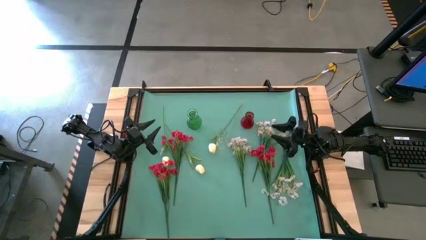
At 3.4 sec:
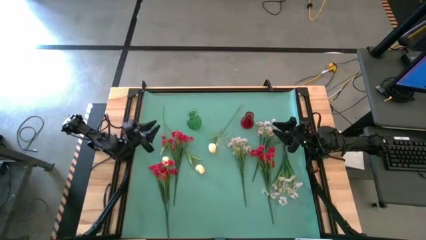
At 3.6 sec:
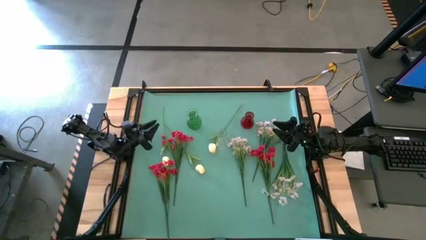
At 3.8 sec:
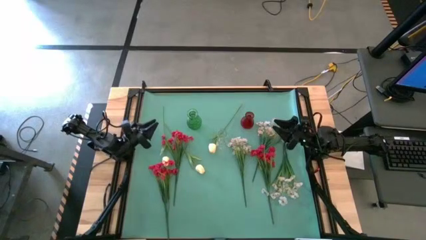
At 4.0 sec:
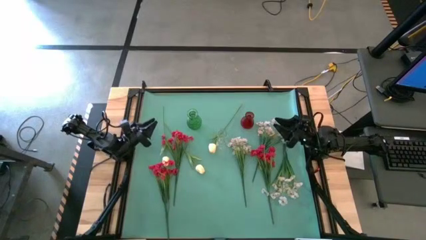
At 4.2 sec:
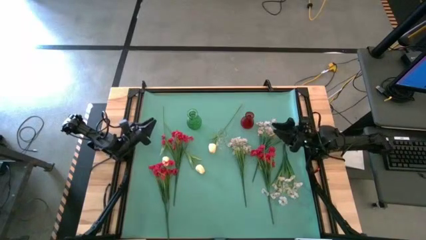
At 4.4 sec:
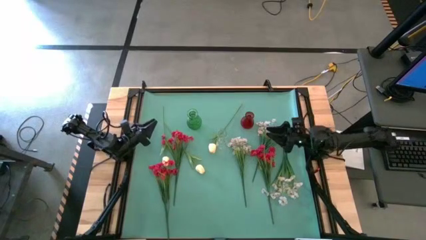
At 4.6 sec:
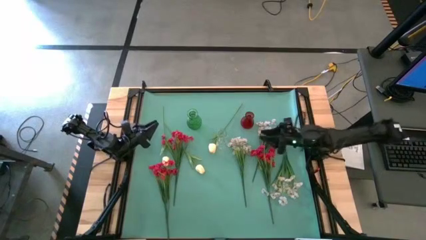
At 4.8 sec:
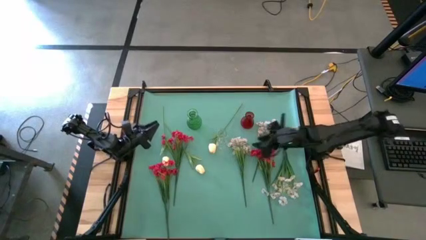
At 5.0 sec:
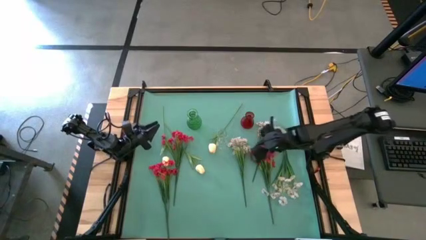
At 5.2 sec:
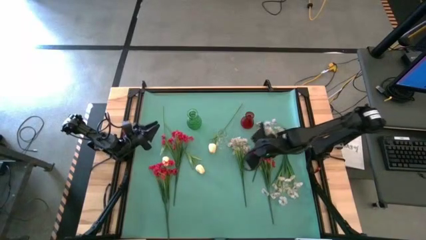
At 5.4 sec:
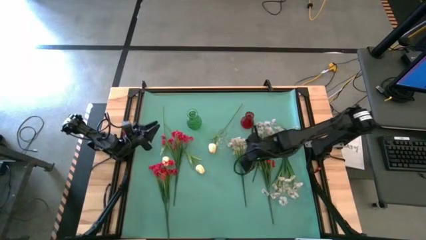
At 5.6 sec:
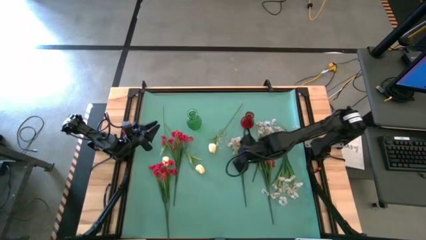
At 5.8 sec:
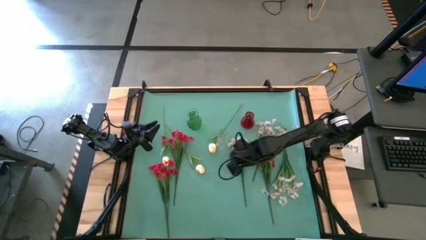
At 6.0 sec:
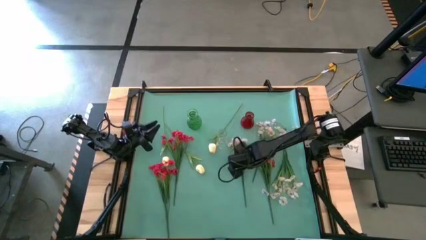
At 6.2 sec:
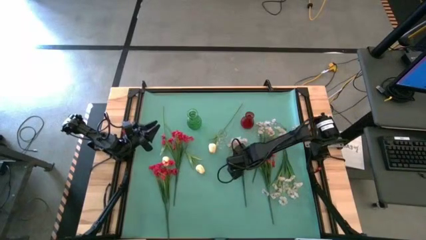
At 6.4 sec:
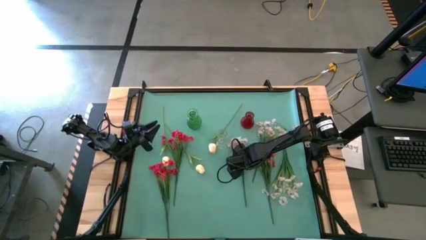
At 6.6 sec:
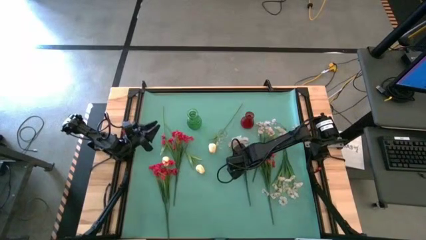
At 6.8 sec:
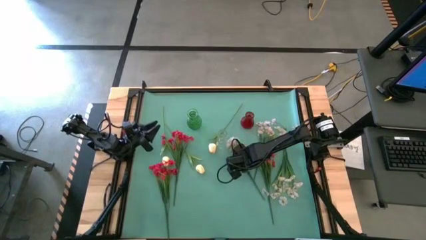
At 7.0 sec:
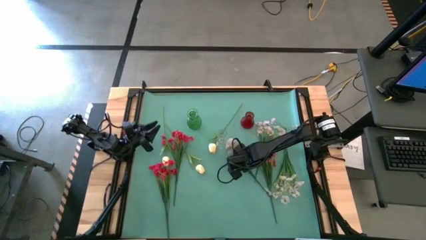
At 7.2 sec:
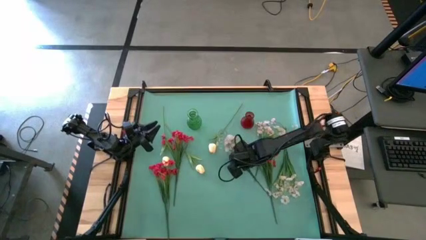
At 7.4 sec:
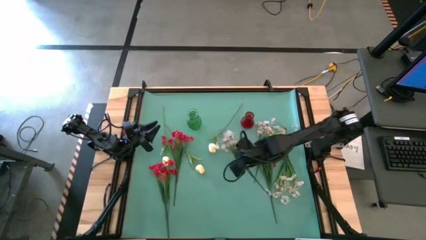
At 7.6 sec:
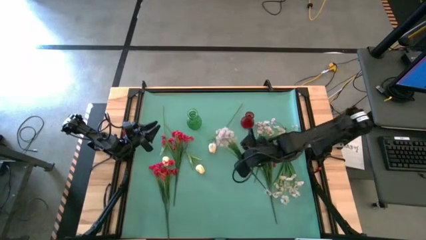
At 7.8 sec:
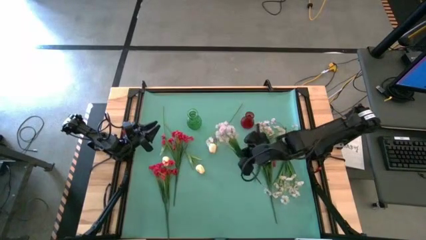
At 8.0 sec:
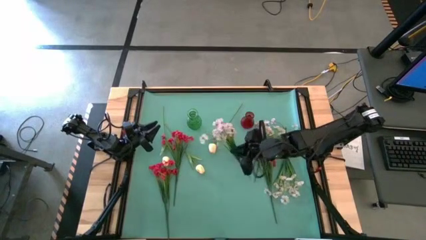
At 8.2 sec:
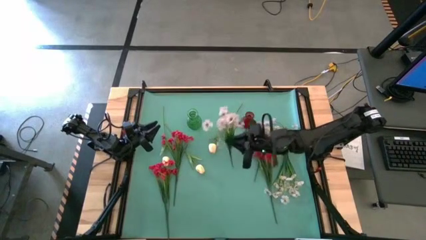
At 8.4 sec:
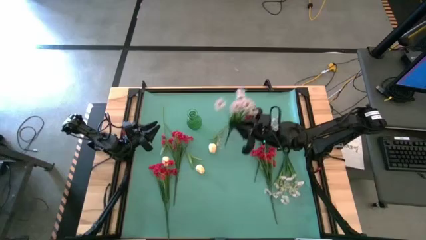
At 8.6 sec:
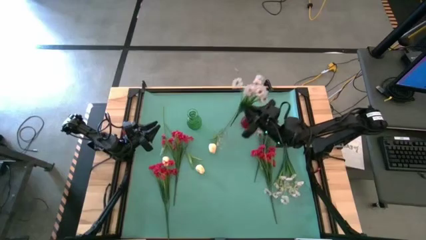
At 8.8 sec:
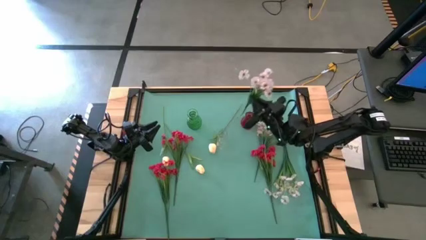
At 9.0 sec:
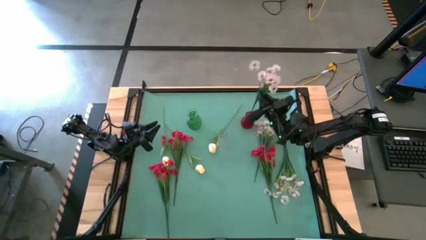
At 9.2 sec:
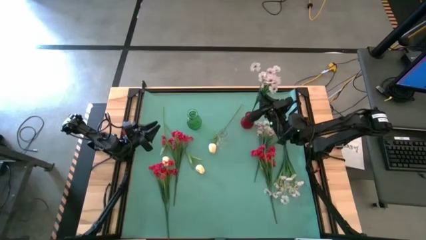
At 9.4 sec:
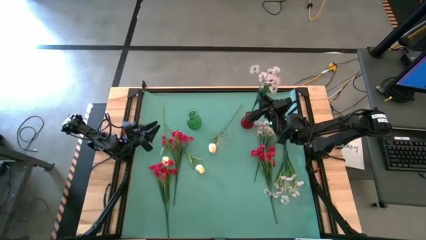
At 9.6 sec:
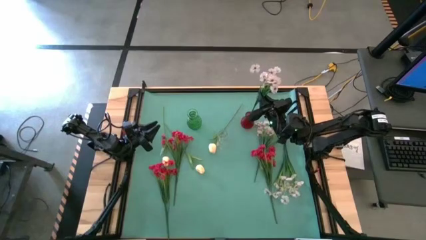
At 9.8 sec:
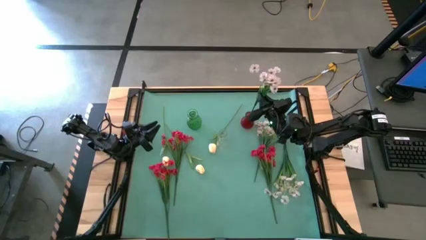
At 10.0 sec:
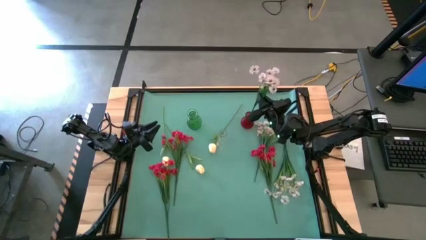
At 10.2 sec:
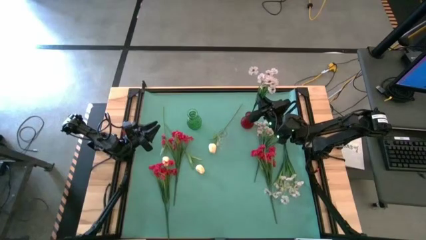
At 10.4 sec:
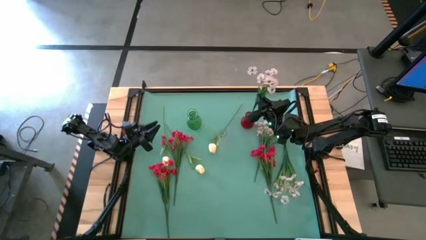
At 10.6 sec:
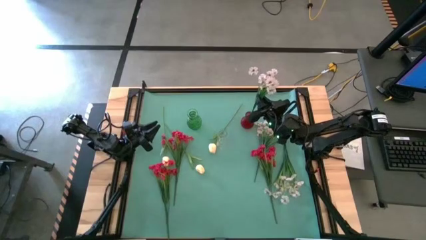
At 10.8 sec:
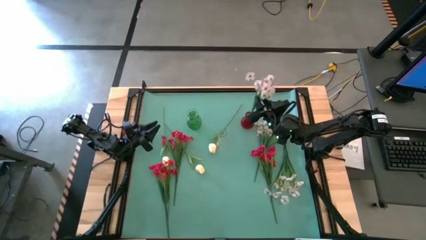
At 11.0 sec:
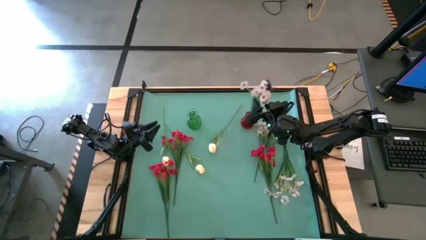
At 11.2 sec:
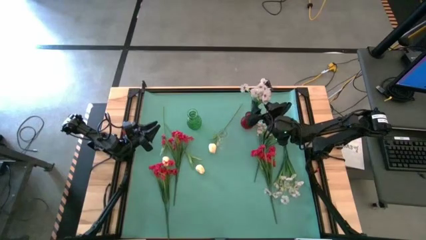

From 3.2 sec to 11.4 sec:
Task: Sort flowers into vase by color
Put the middle left white flower into the red vase

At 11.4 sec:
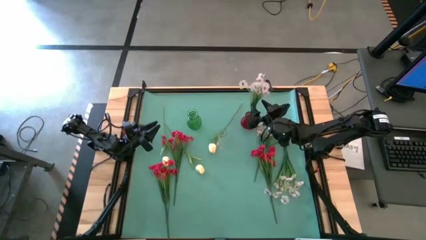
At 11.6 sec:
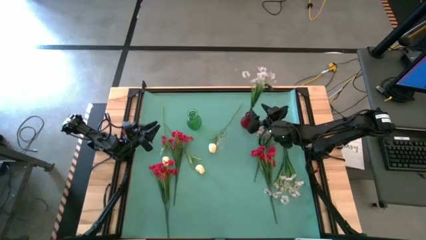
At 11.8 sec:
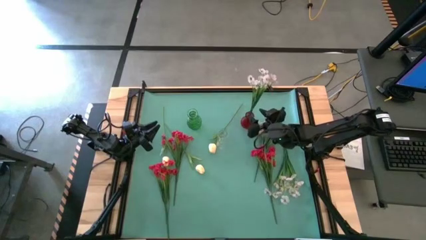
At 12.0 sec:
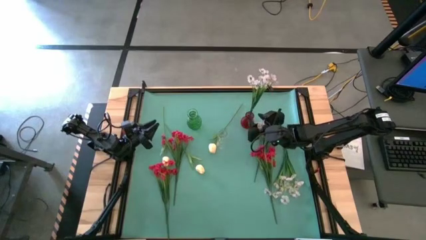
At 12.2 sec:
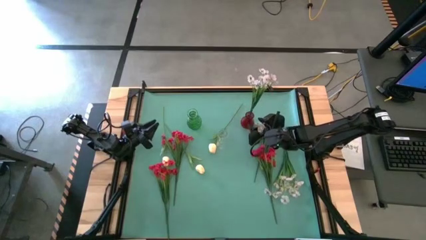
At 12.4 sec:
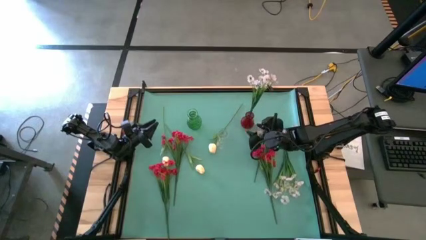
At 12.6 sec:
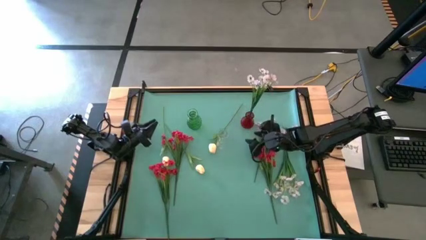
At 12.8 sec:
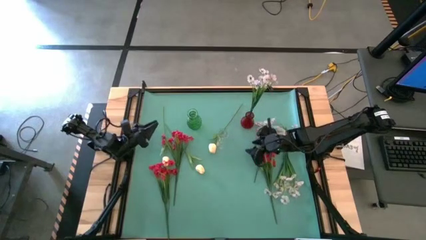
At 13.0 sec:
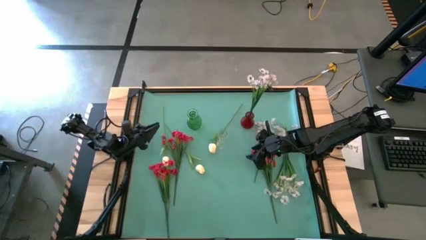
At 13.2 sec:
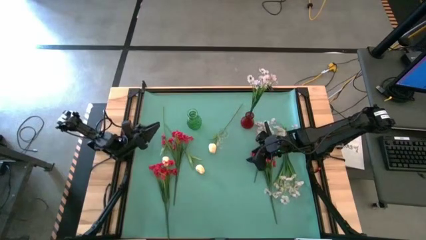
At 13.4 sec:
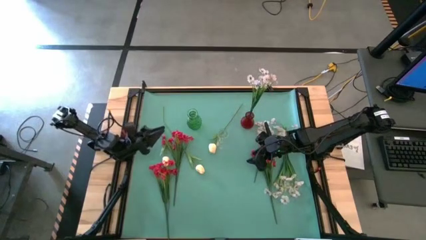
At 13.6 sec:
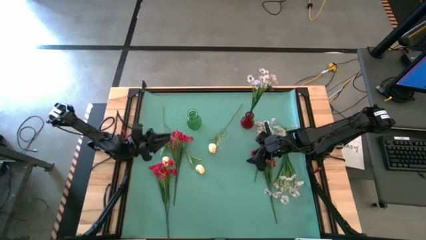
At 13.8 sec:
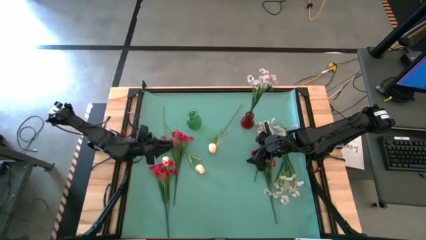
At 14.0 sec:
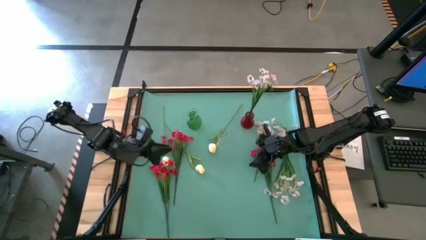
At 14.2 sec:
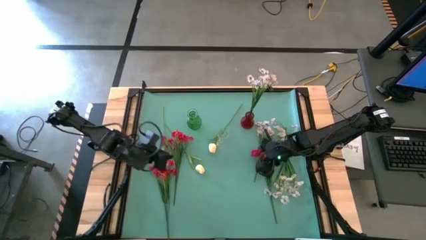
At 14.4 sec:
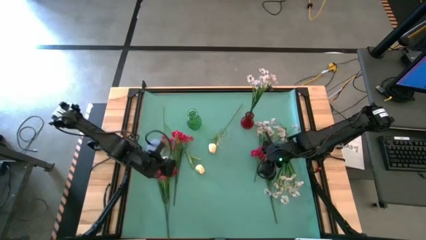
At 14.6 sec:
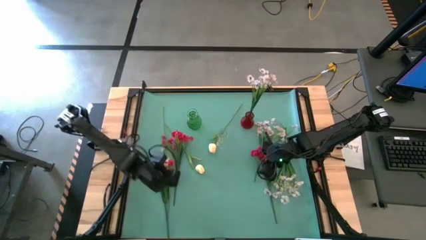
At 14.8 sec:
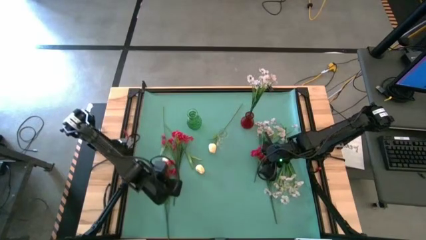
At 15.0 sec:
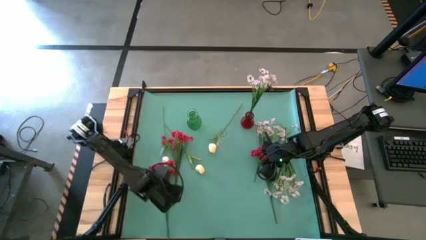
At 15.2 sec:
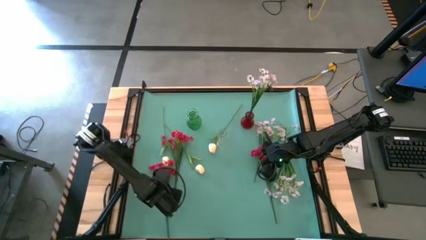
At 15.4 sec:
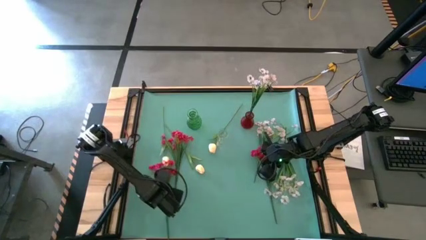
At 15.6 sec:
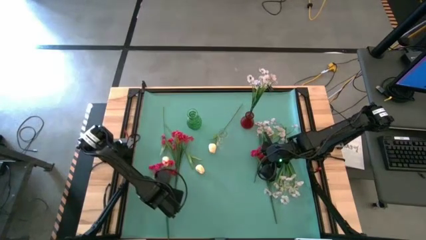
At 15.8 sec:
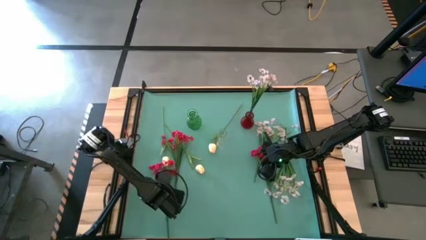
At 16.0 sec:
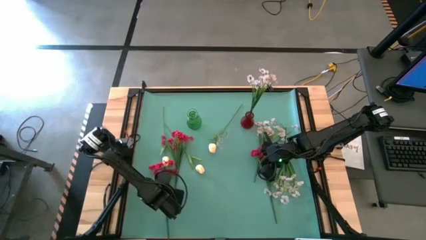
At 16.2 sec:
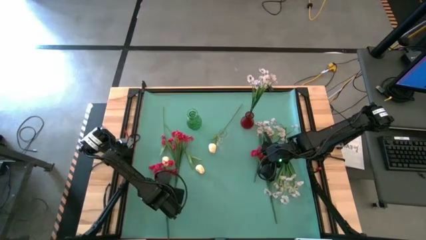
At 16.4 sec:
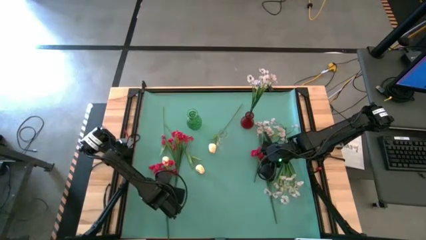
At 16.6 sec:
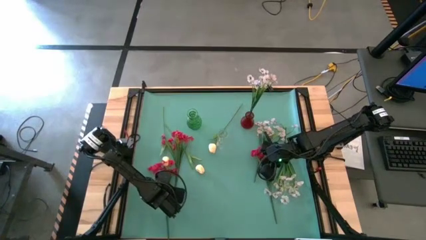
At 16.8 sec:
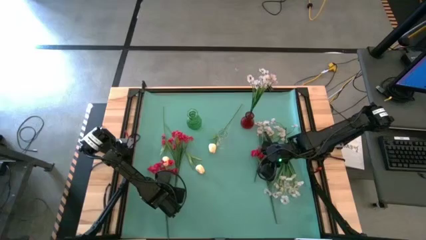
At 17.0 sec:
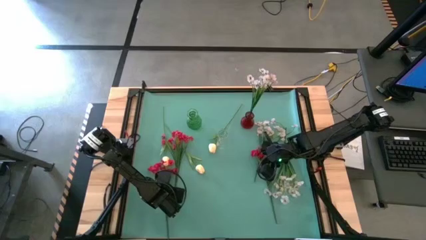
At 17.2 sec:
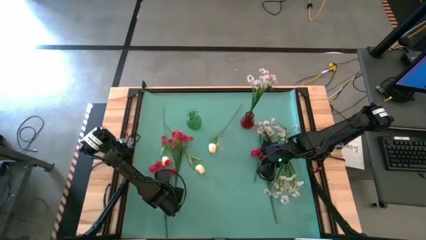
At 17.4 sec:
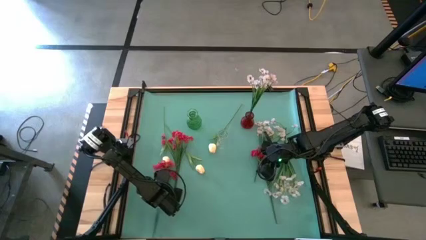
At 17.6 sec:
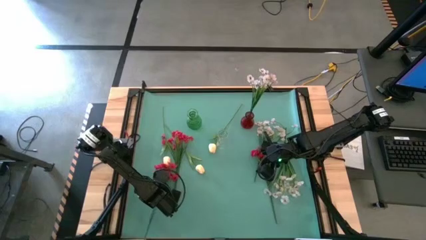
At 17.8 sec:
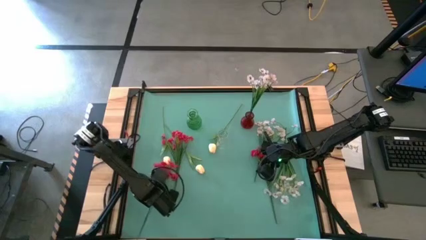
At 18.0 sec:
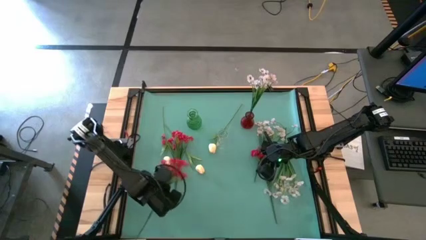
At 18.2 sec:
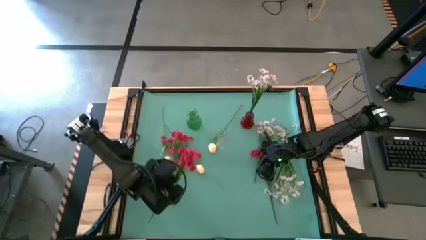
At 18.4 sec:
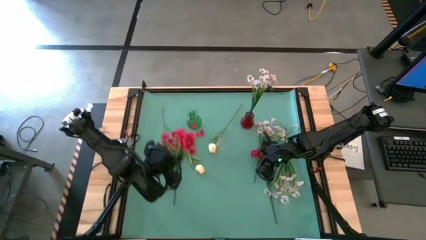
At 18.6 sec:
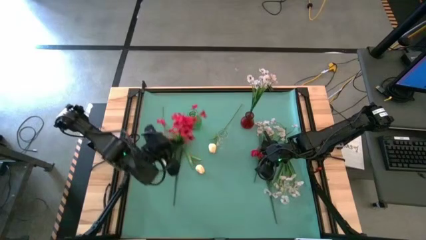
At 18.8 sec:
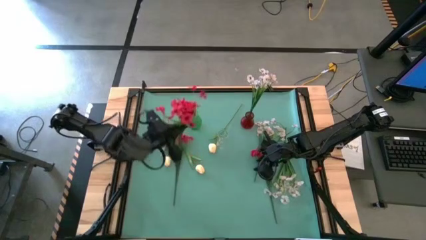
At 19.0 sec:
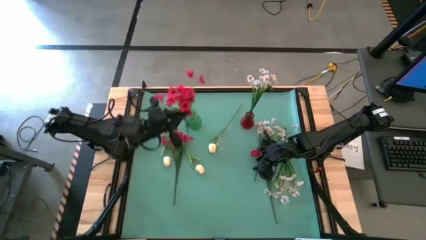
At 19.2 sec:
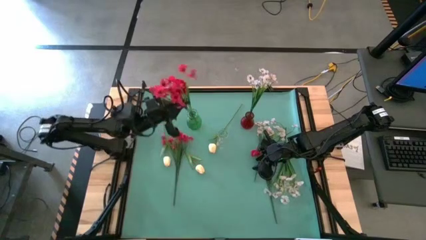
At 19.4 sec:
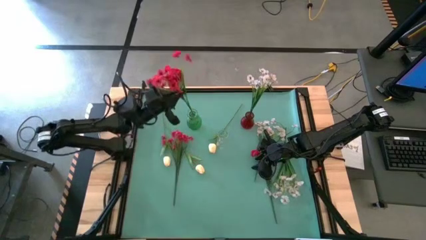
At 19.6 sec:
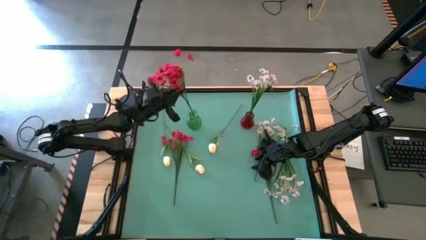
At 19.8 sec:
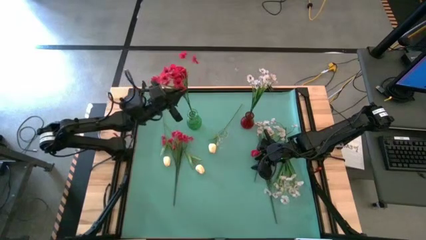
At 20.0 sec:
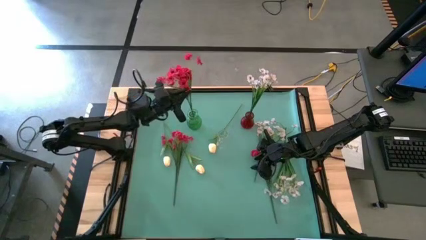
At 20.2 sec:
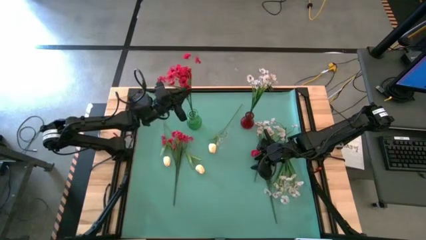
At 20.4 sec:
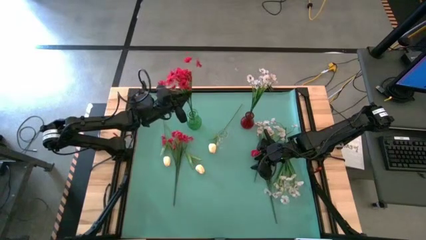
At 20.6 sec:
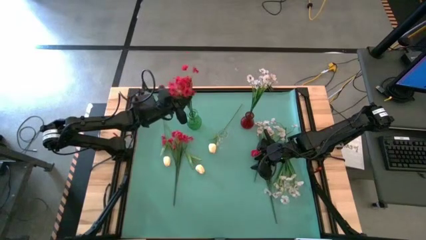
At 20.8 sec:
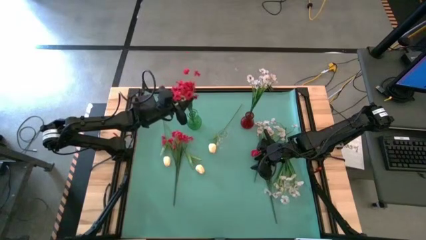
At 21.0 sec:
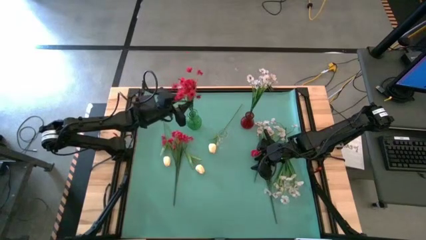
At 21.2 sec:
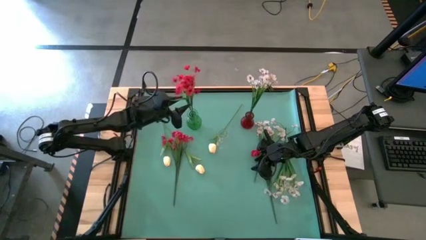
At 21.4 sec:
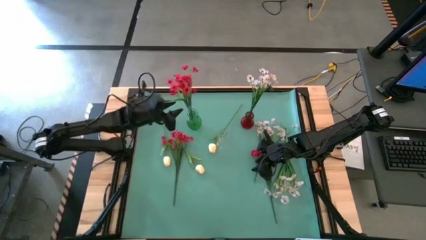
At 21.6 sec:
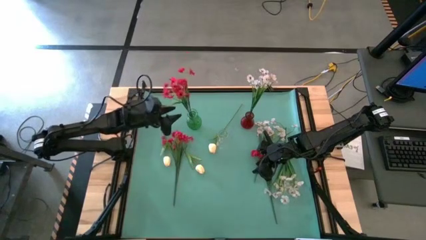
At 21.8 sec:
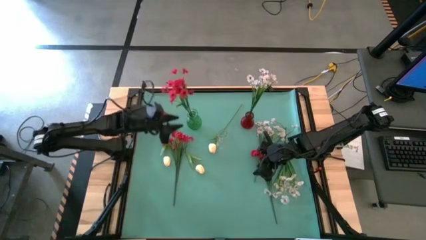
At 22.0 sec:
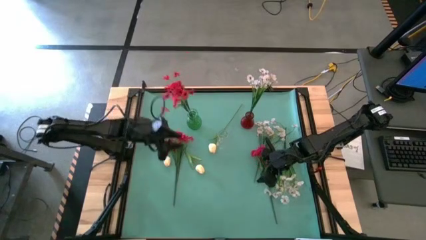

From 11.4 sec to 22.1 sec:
Put the bottom left red flower into the green vase
